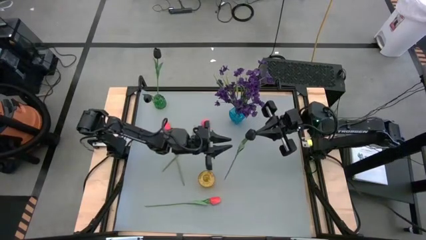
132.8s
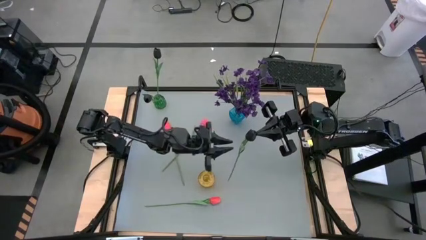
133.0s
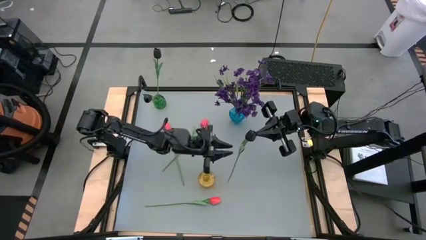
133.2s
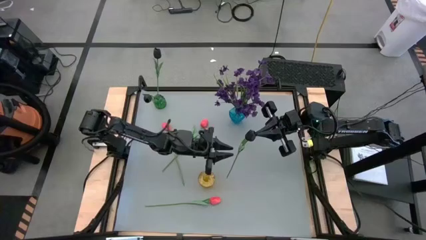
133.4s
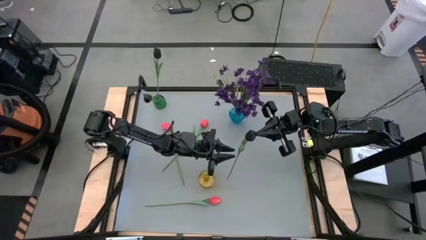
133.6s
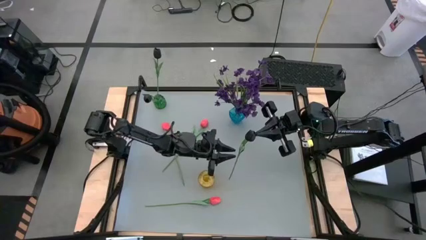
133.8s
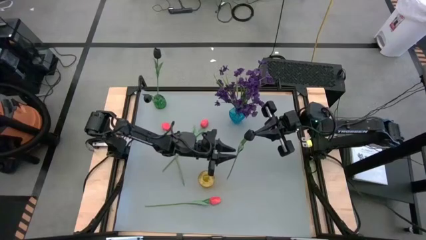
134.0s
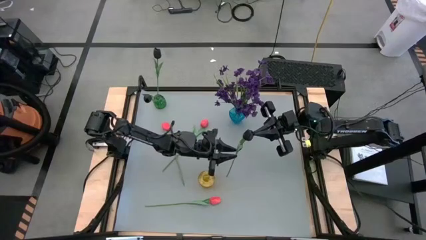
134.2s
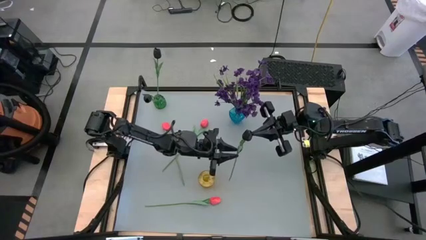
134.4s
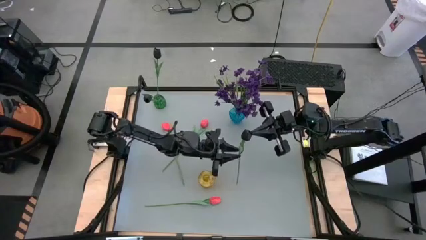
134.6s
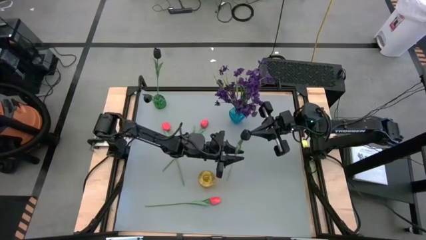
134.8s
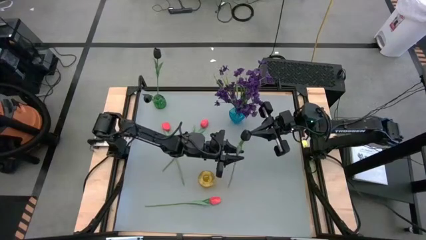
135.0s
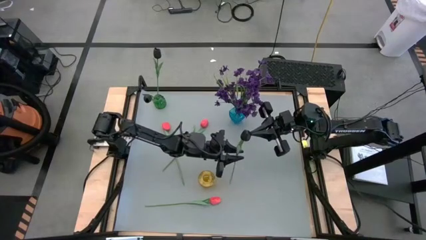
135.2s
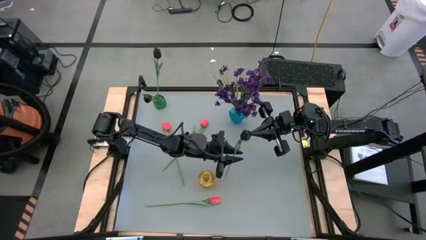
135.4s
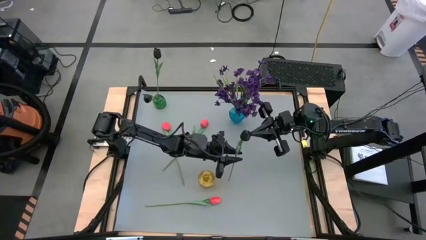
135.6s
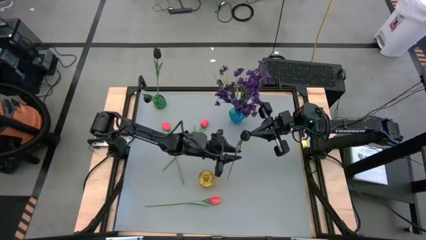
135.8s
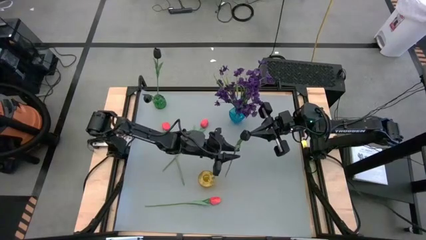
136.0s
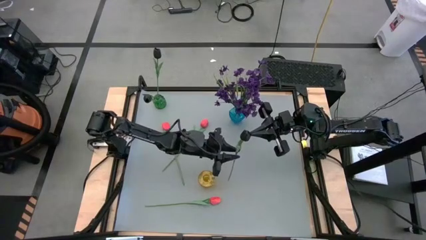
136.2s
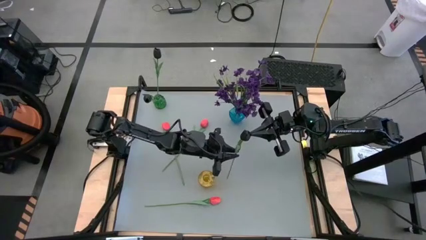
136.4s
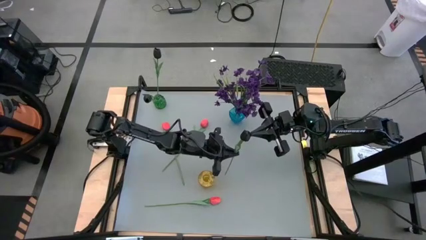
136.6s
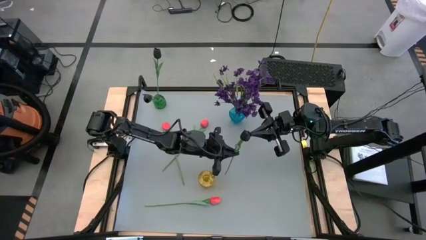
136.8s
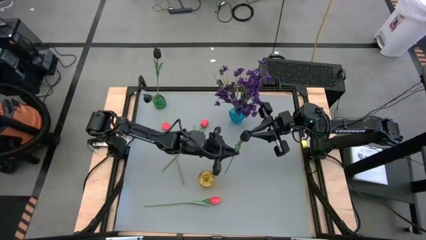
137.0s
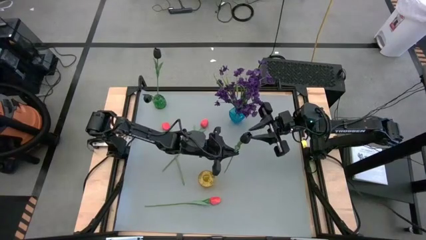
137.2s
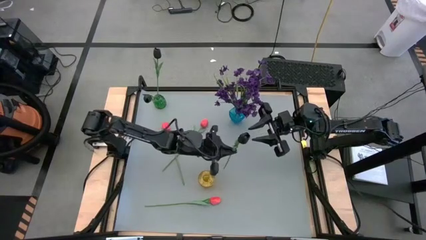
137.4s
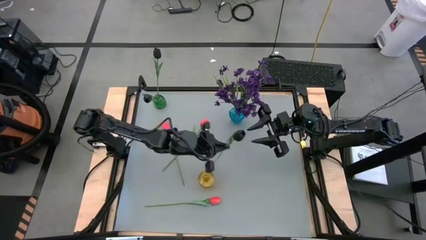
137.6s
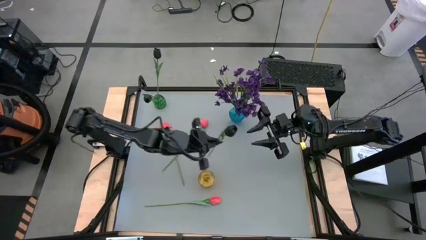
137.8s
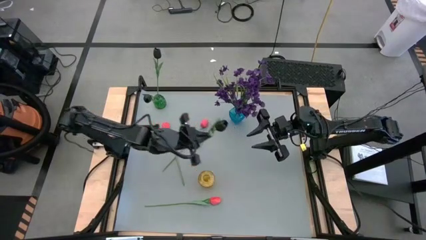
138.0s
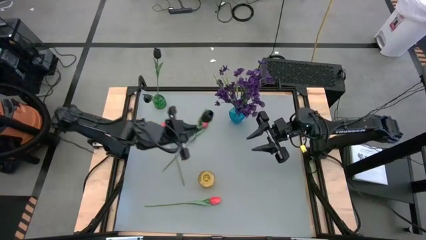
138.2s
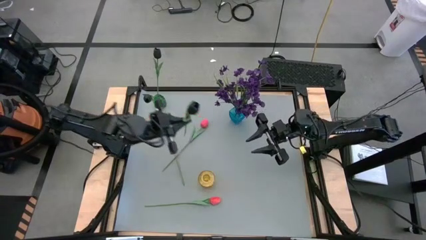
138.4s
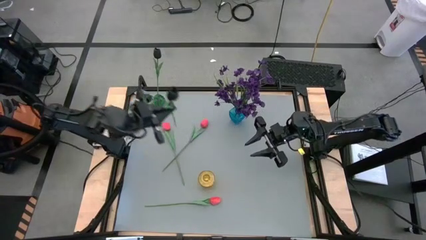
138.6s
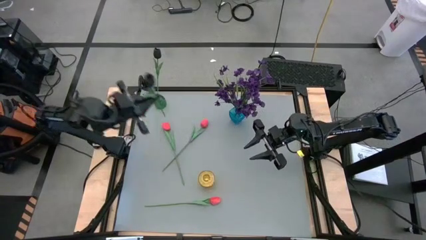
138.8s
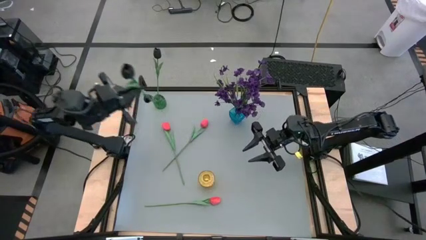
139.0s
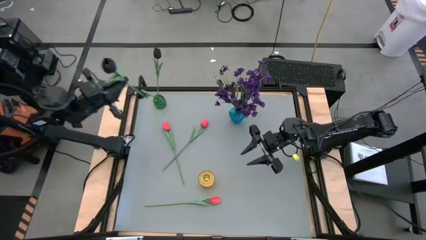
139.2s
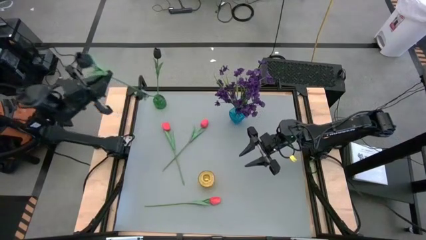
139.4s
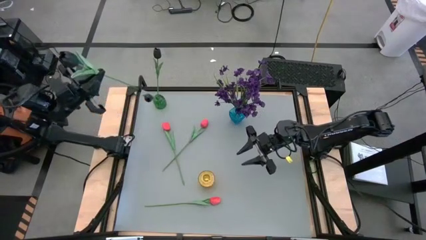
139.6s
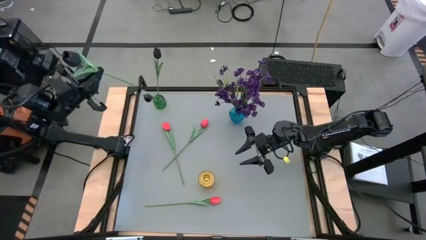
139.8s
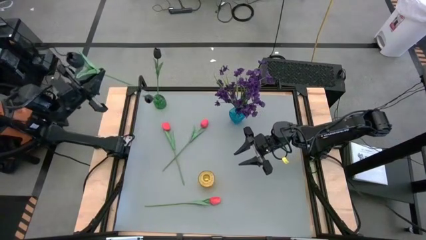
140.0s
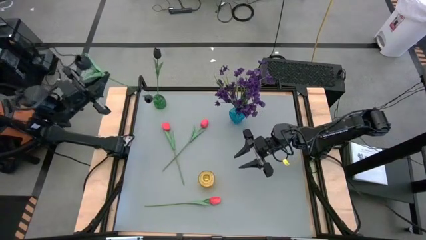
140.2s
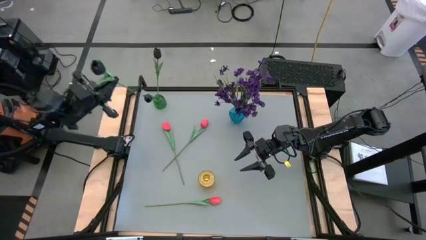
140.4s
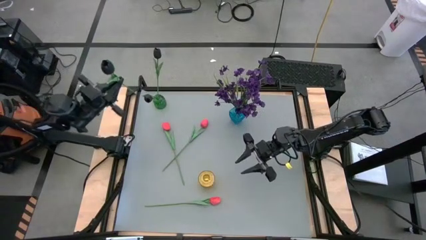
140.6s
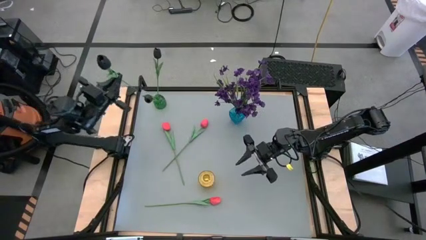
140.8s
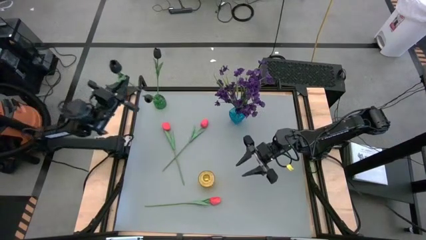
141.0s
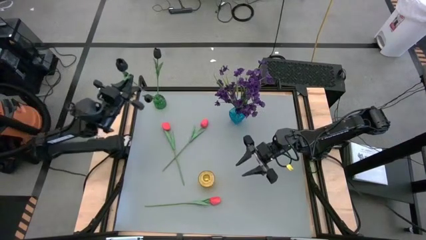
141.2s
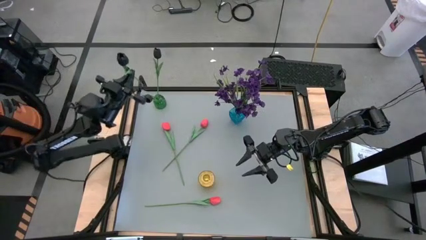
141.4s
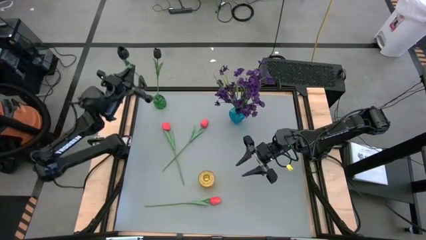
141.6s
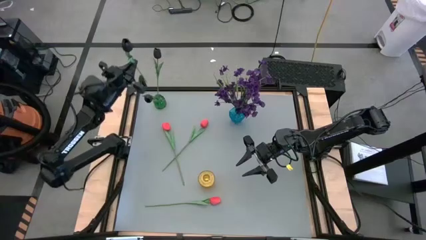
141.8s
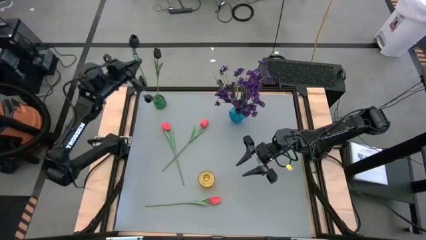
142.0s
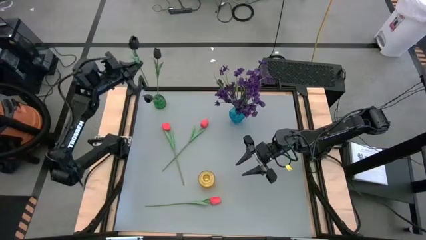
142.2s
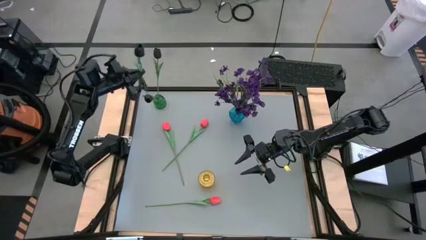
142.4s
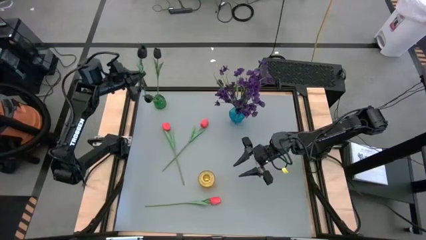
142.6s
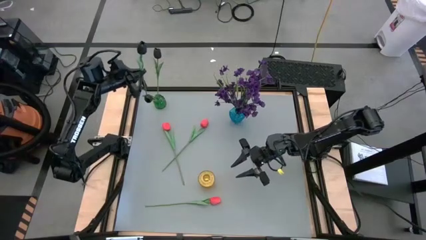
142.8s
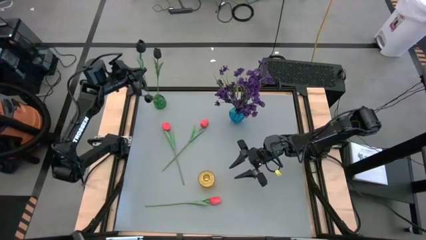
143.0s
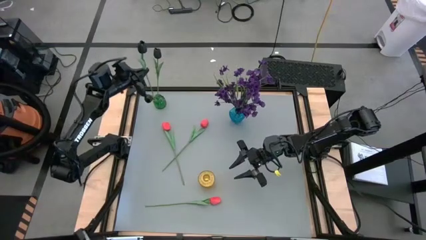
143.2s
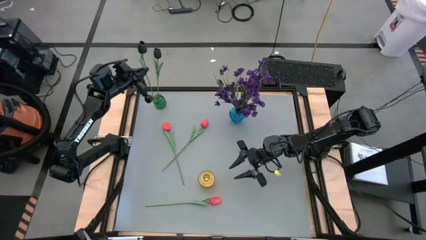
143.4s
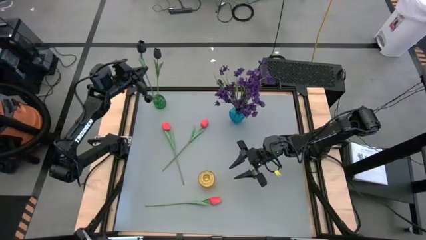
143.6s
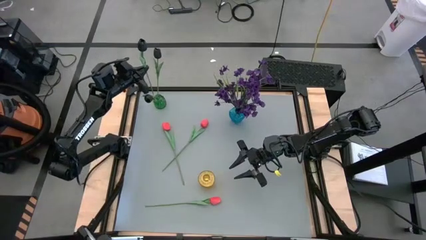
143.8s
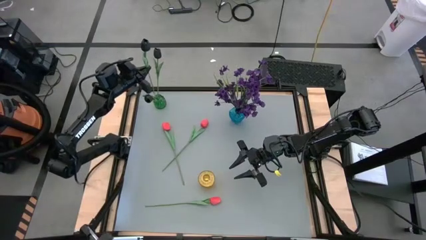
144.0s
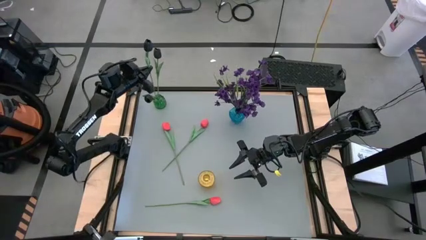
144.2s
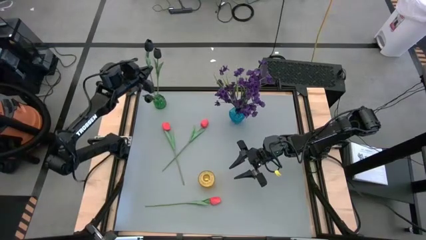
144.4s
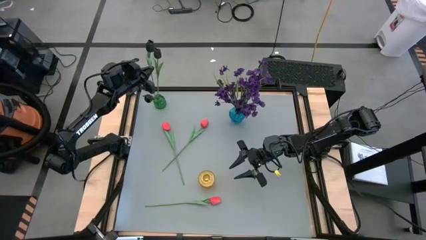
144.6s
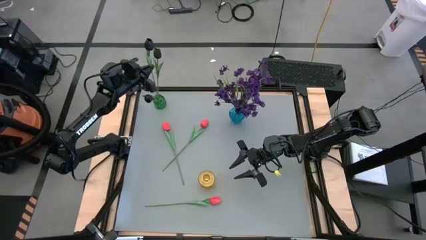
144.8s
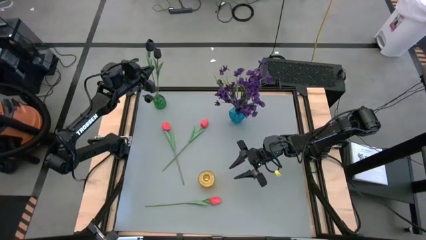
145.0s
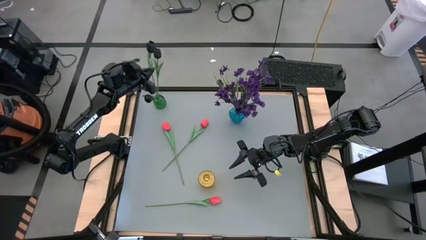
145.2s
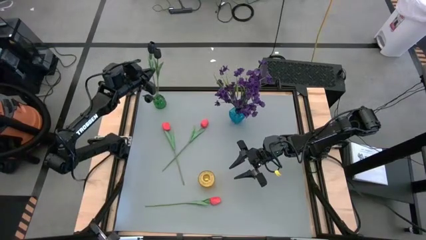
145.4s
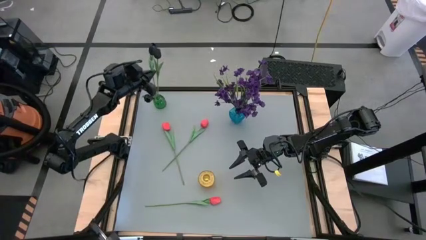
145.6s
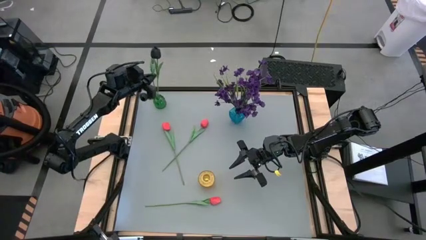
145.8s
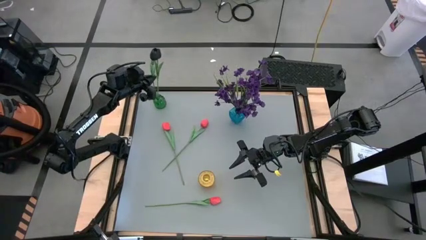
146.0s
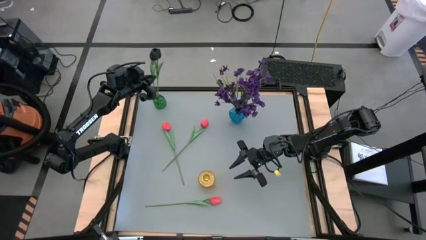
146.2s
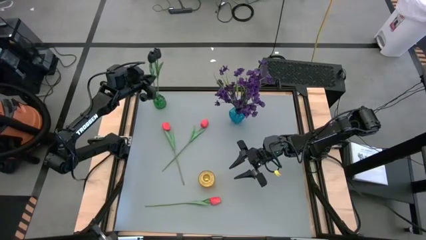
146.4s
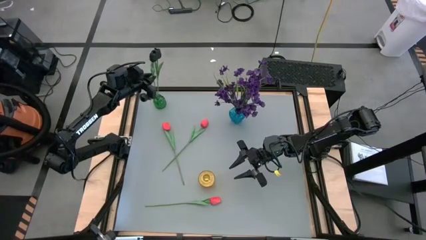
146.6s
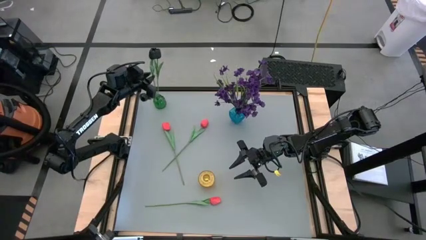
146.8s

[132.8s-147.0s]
Task: Sort flowers into vase by color
Put the black flower into the green vase

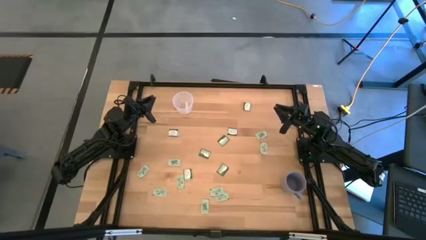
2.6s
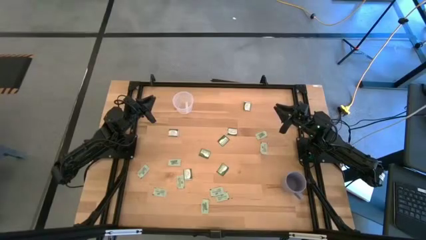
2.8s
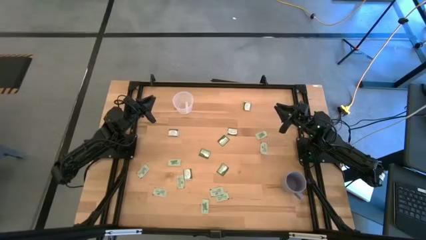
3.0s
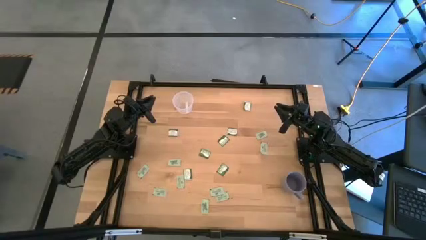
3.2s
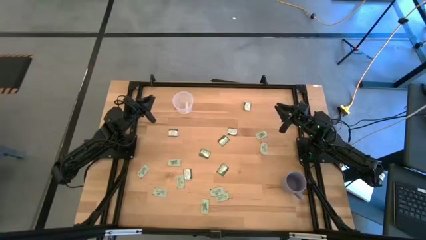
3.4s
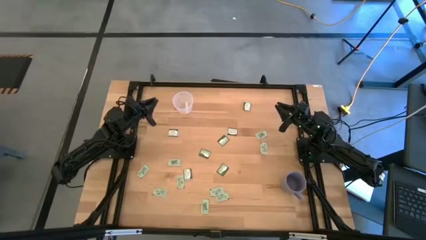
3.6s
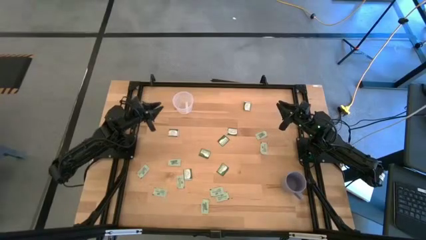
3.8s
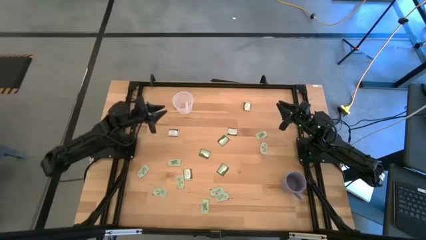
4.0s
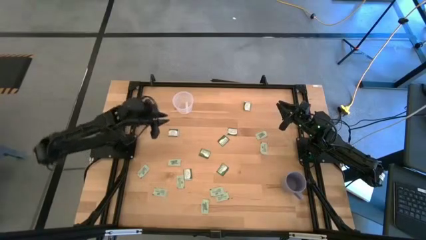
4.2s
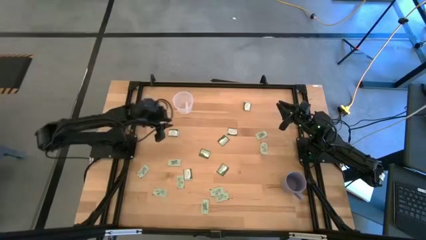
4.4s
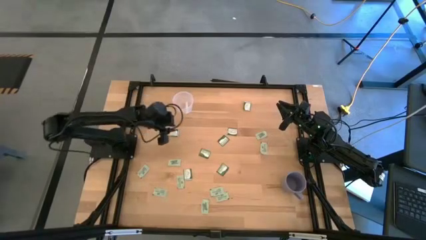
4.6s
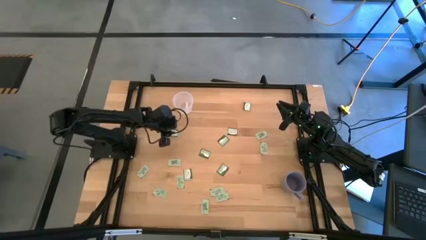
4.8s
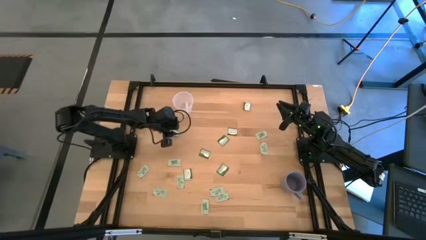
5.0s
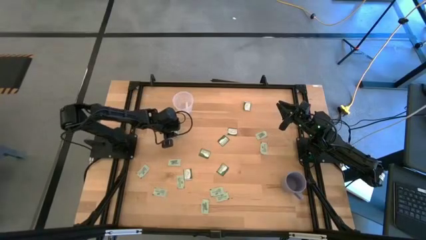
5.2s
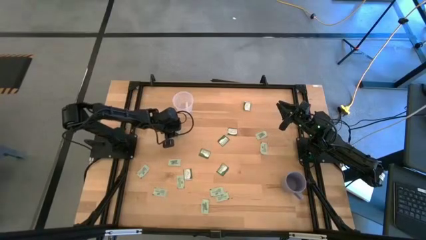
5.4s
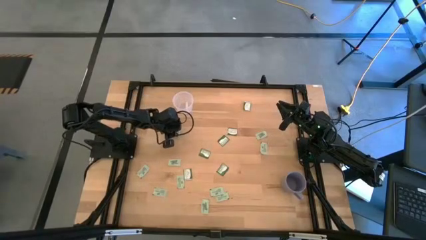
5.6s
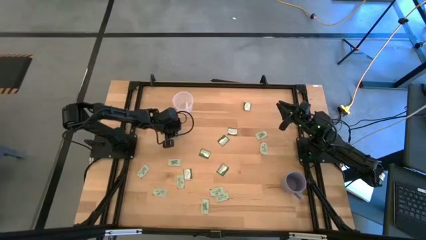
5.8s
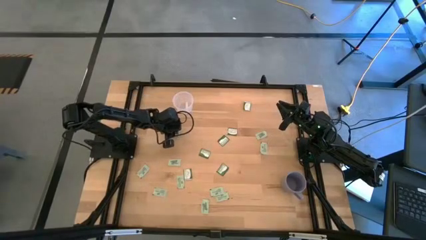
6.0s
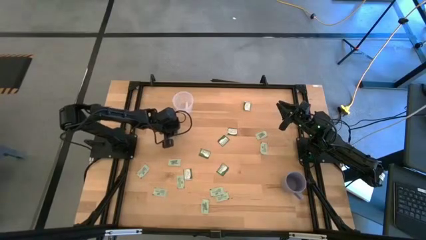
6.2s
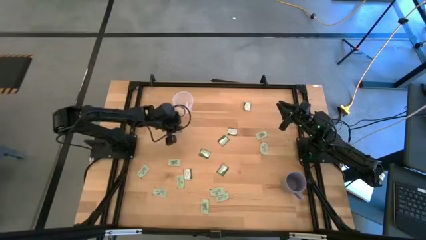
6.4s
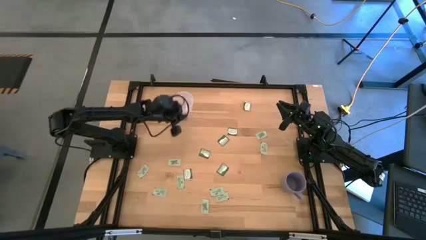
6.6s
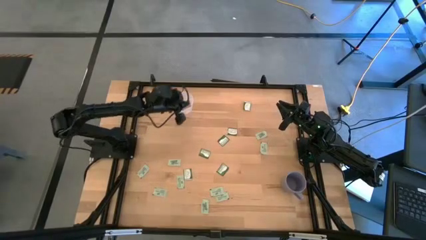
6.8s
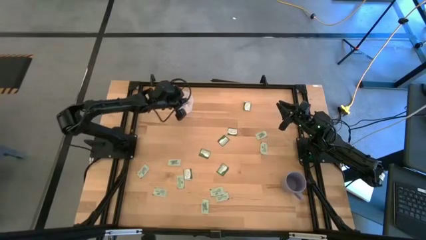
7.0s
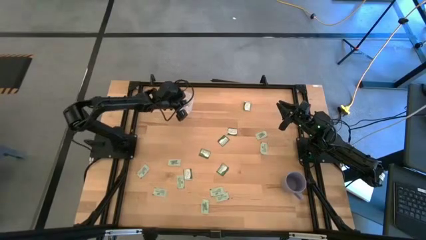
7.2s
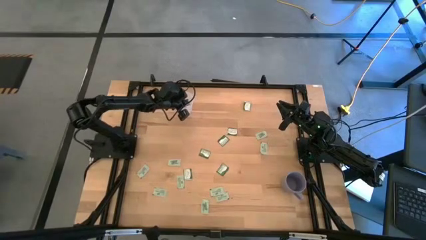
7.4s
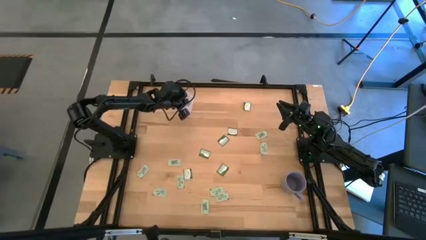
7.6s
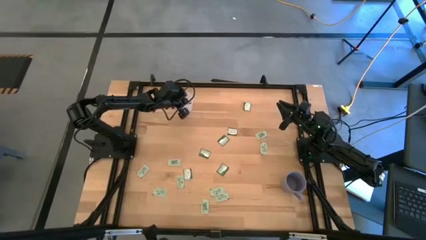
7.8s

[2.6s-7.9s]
Task: Pick and place items into bin
Put the truvia packet into the transparent bin
